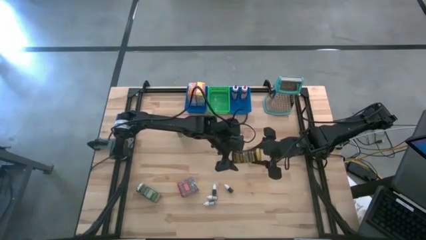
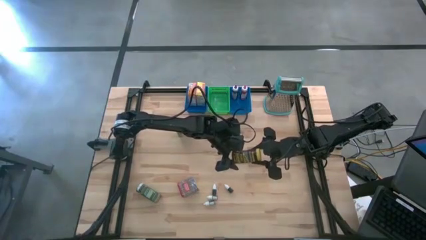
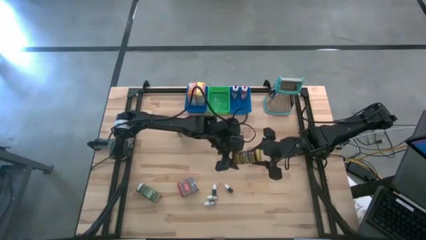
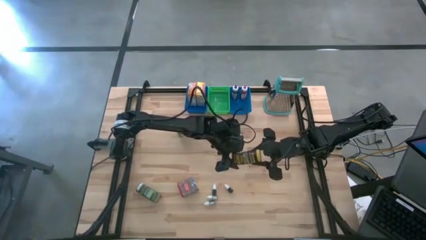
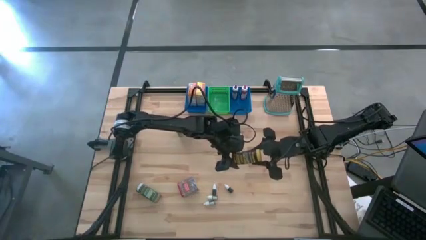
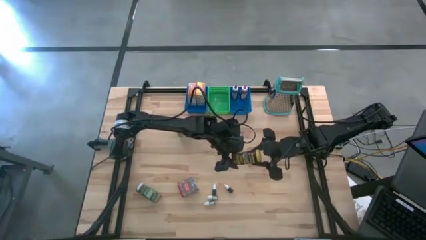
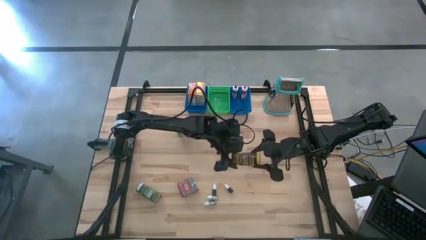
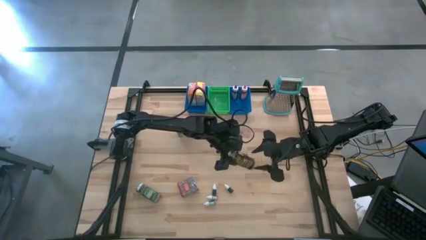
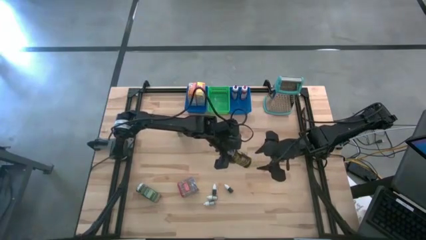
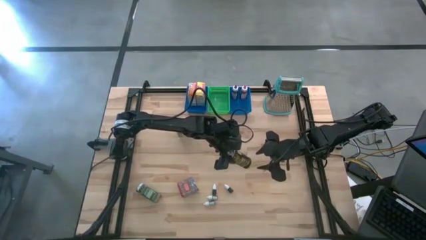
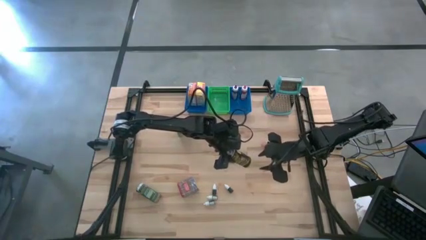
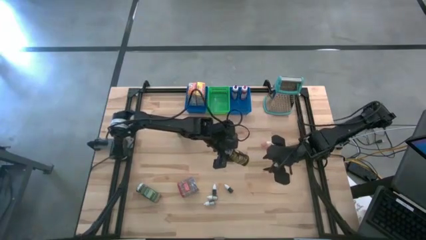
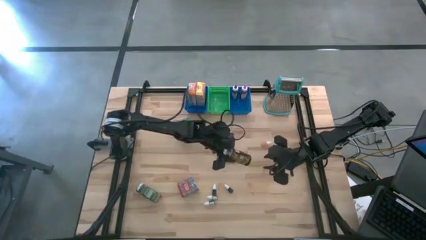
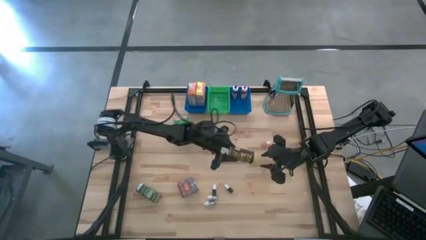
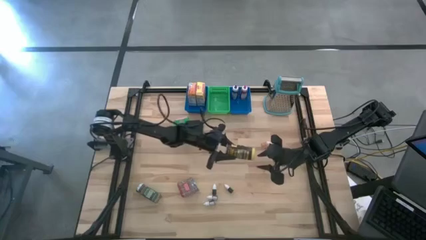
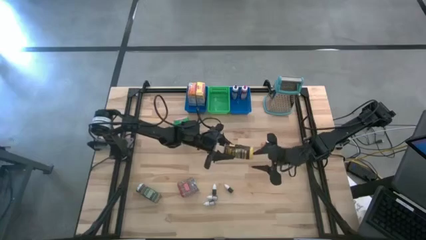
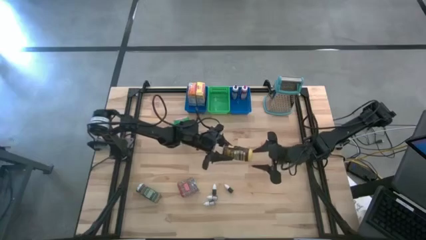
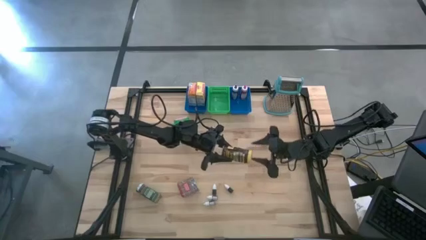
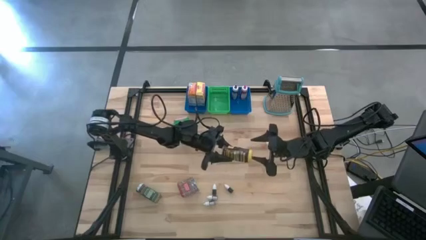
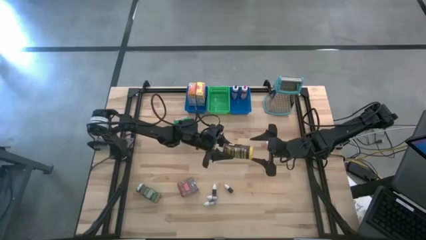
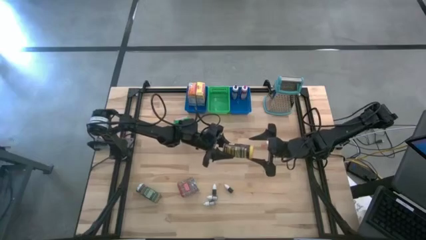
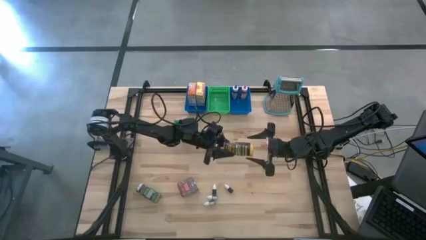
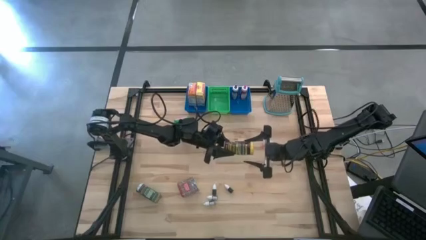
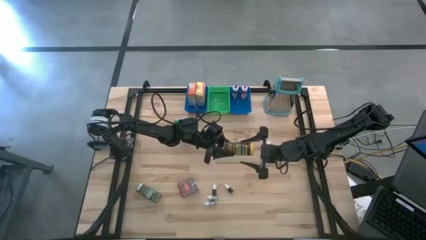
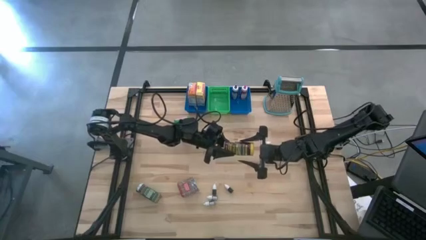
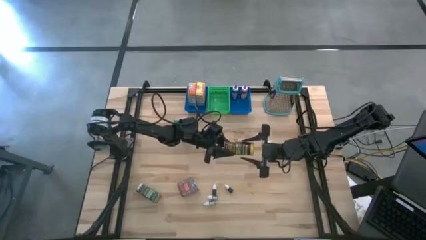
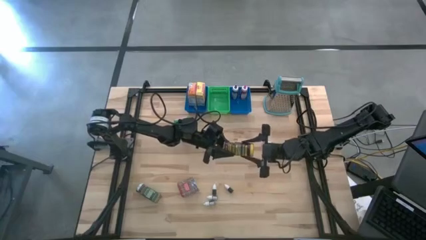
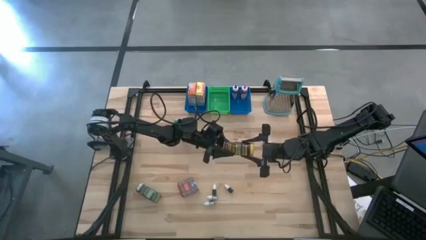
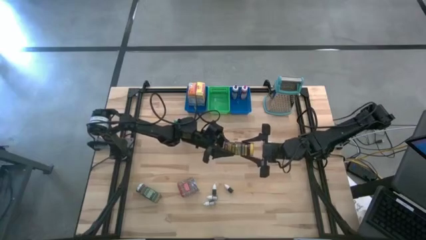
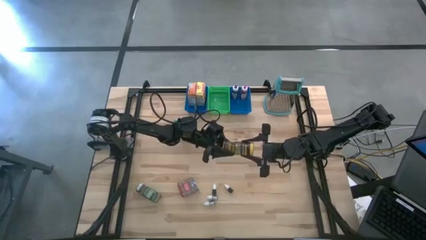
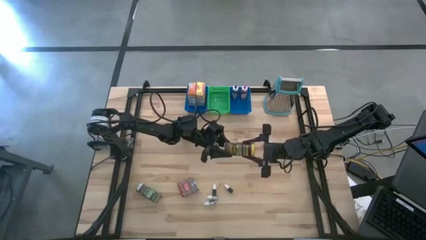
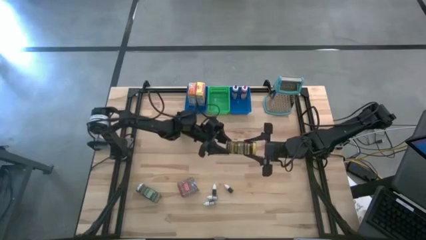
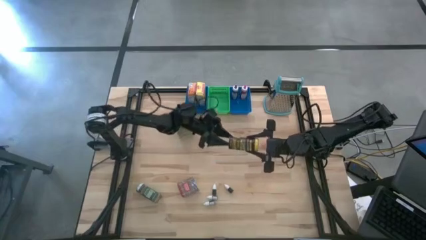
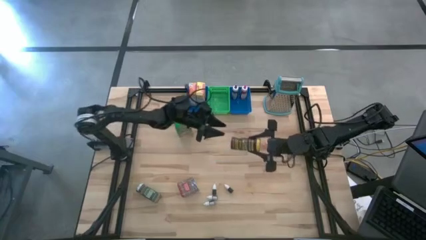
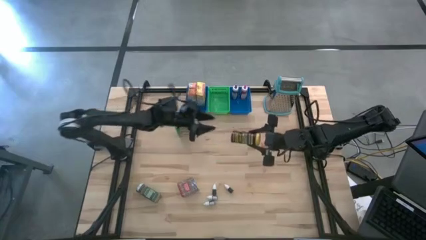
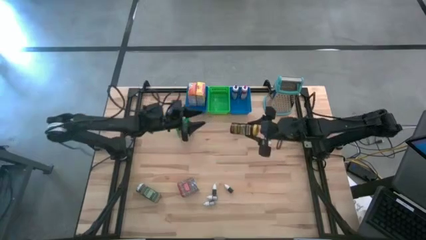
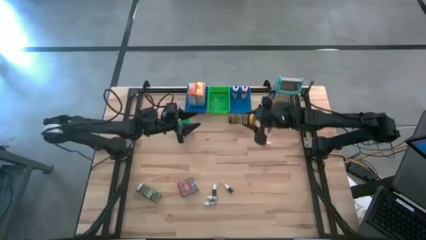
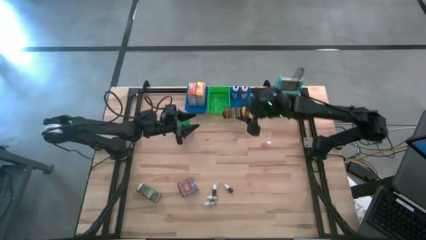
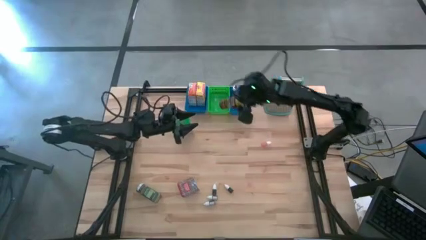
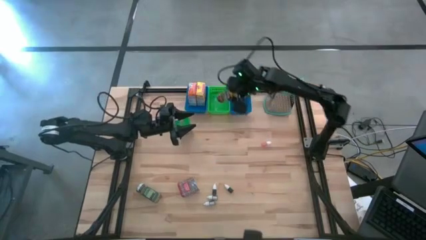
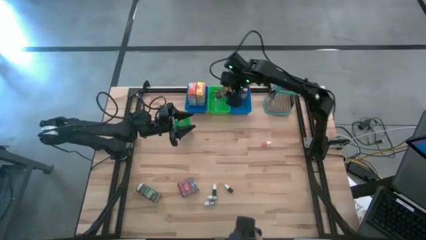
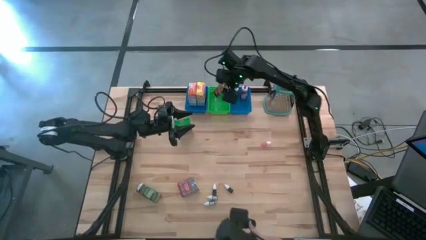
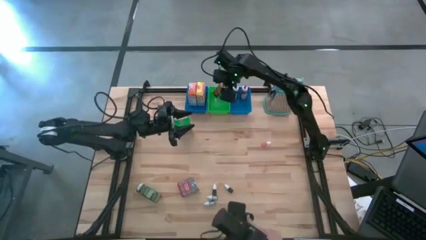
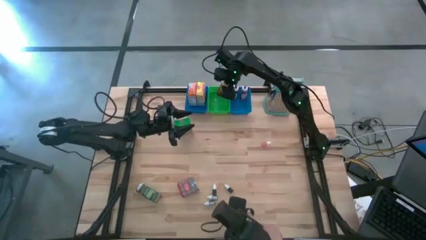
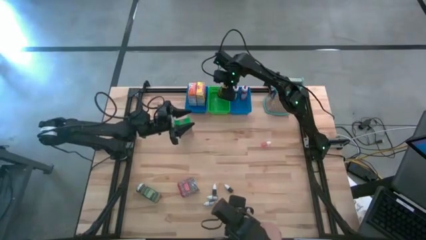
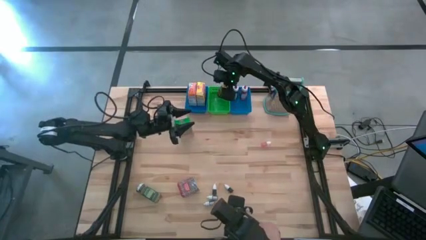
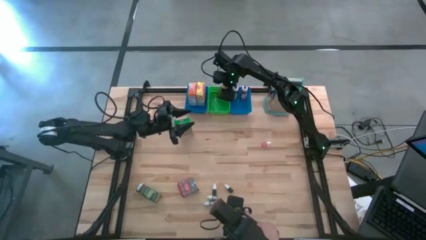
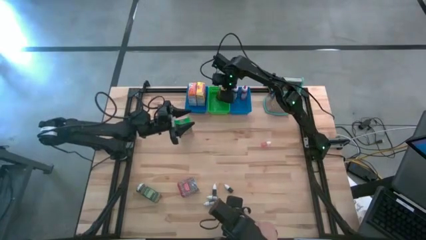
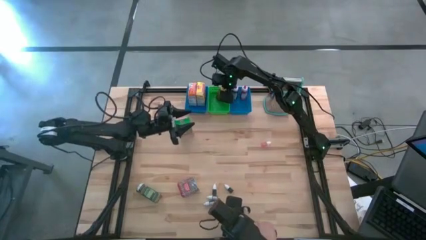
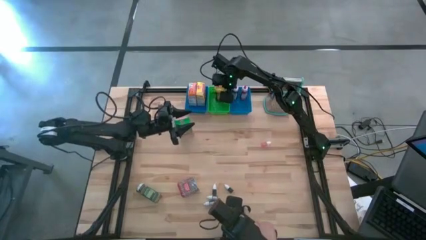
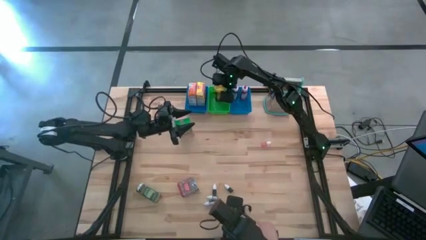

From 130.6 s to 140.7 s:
Task: Pick & Place Kitchen Items
Put the yellow seasoning can into the green bin

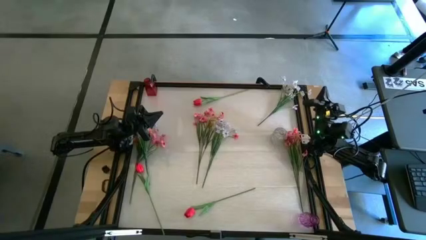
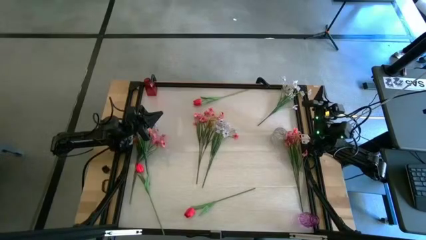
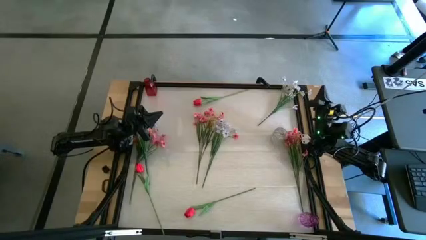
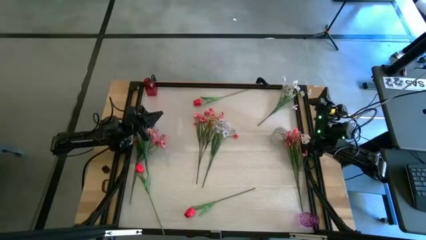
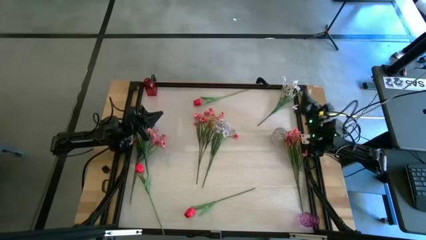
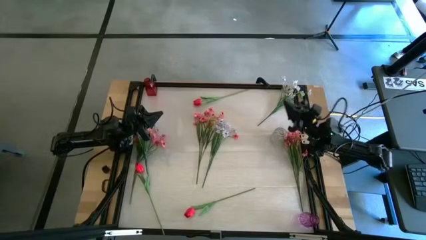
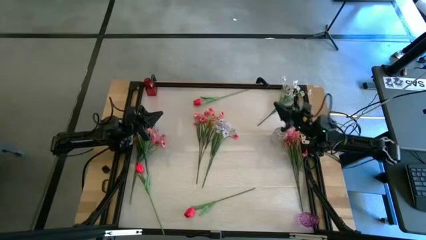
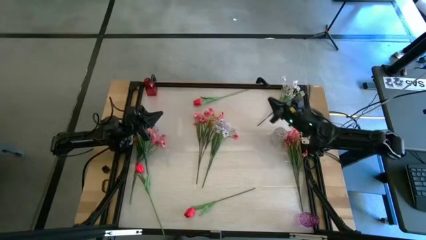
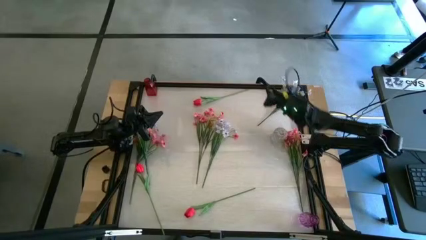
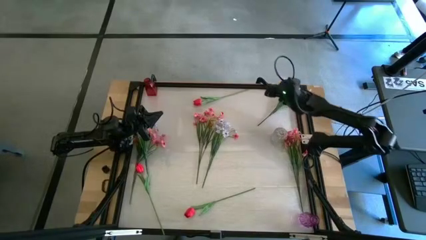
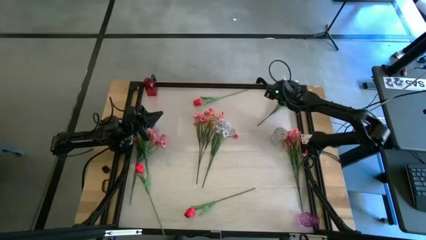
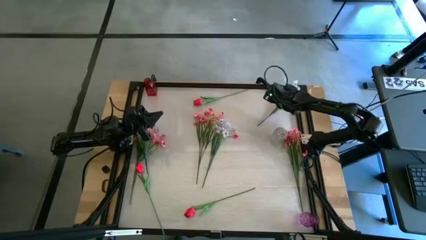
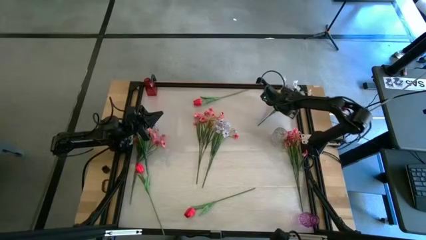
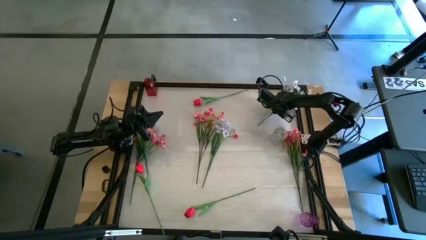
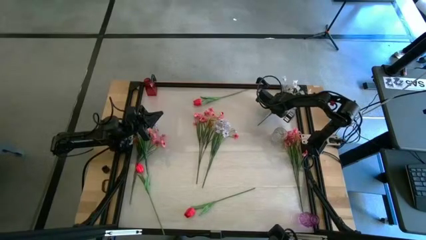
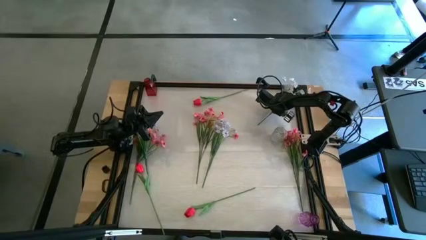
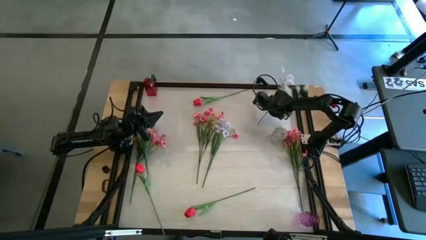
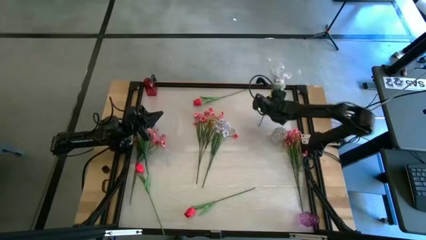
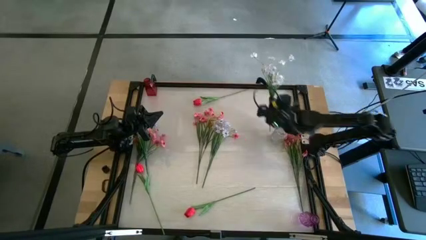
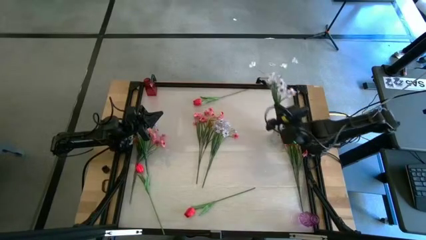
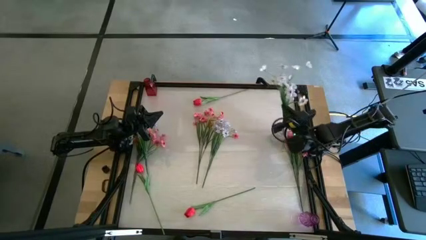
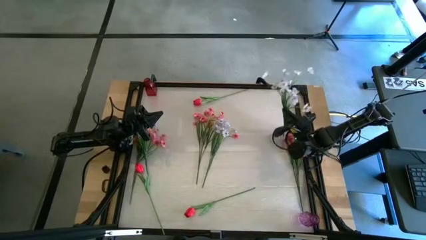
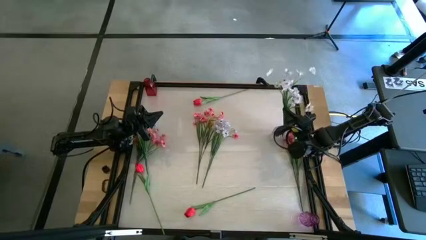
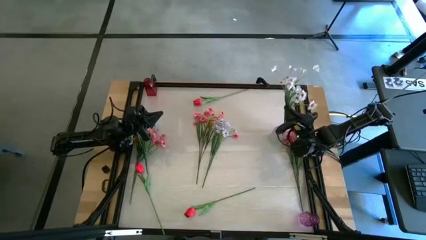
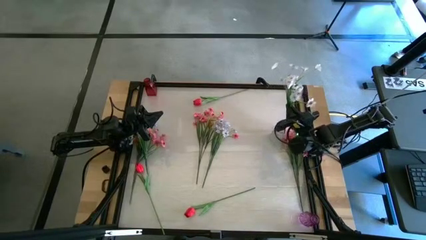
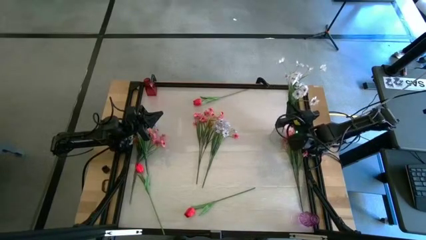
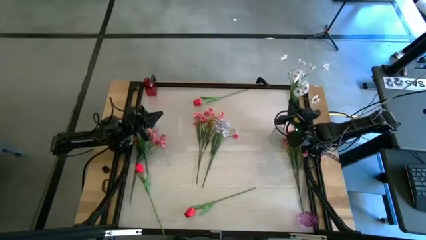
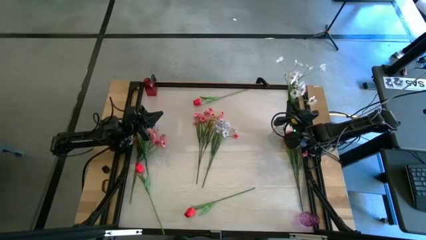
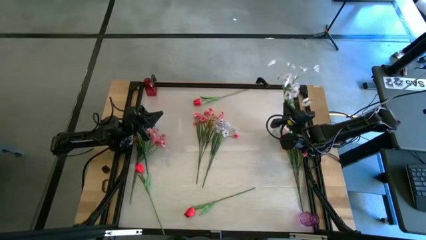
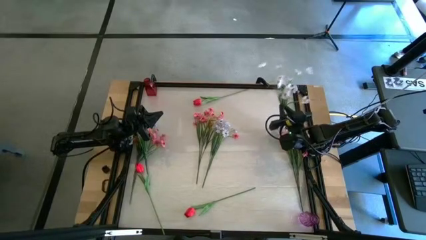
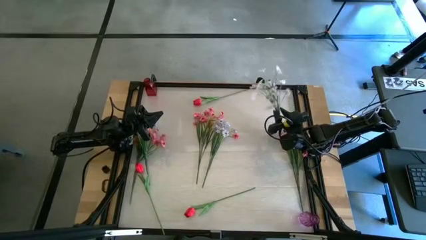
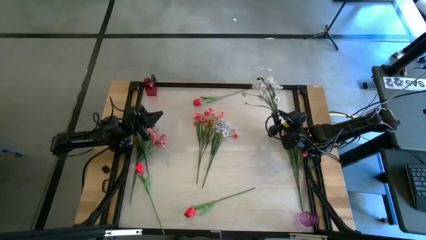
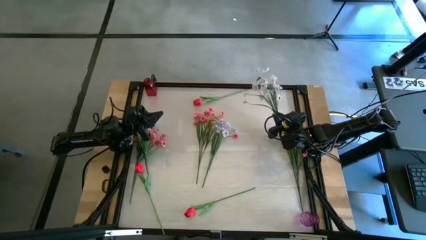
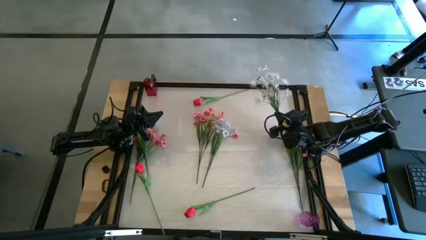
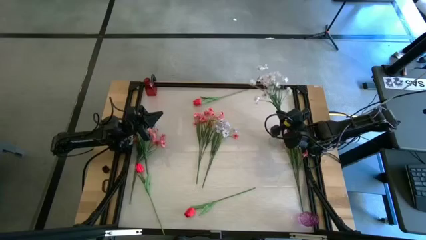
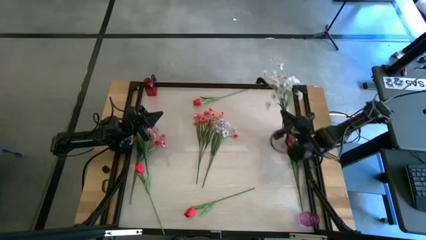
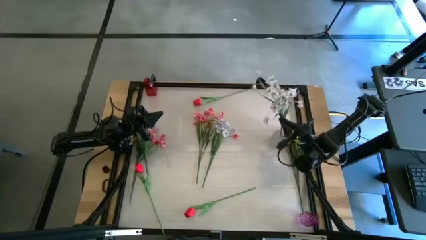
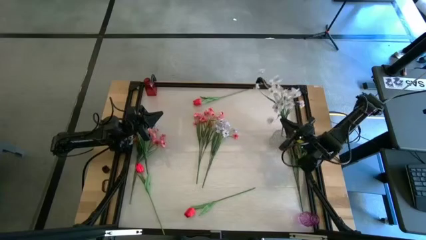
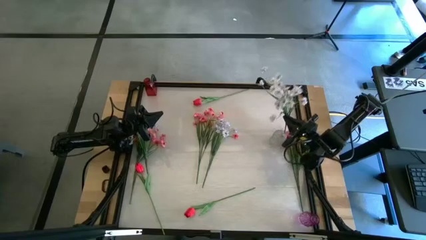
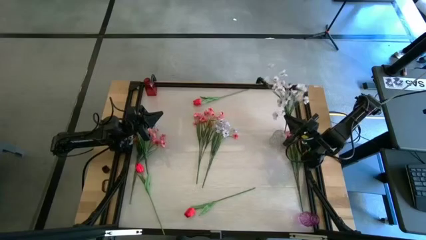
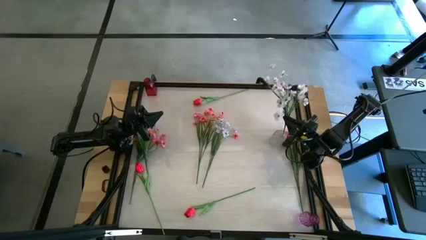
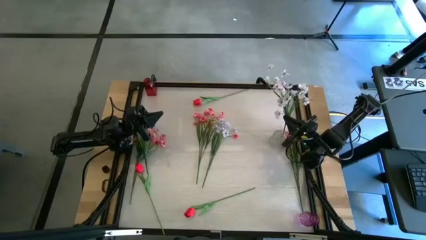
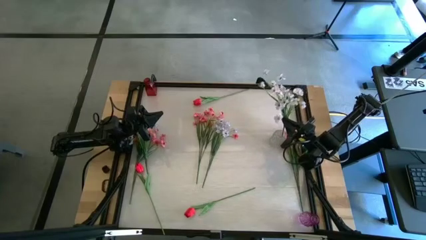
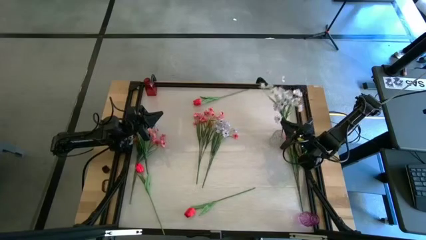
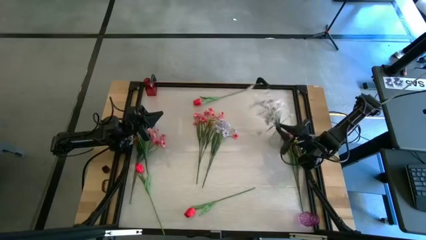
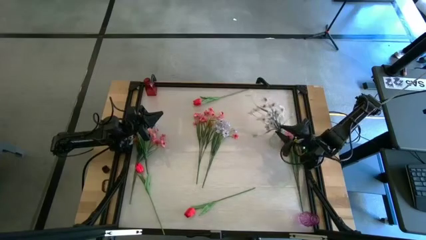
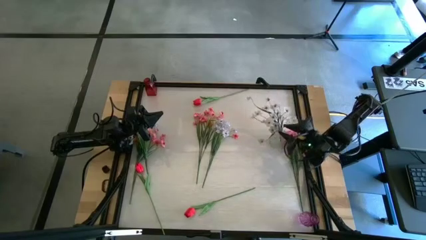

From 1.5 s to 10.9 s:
Task: Sort flowers into vase by color
Put the top white flowers into the transparent vase
